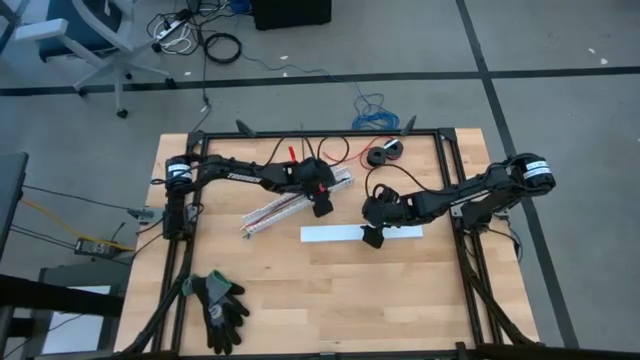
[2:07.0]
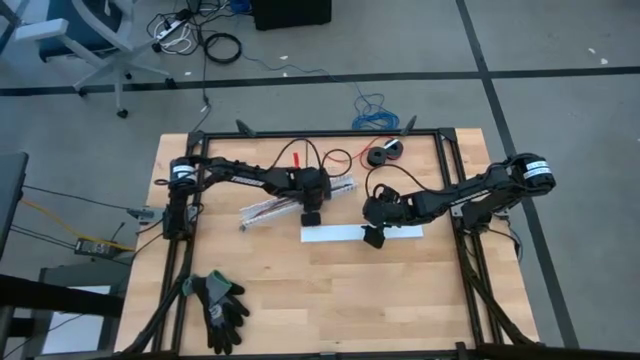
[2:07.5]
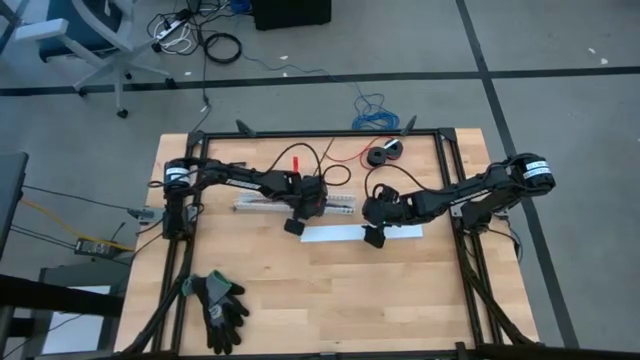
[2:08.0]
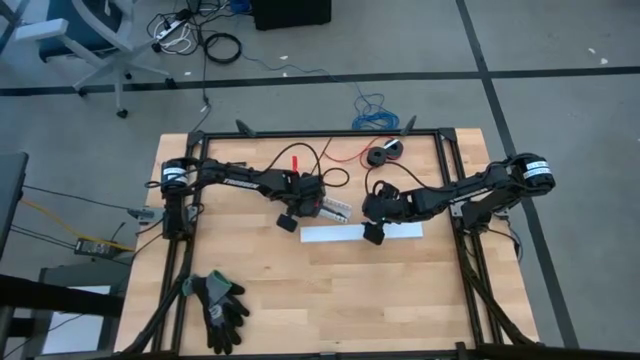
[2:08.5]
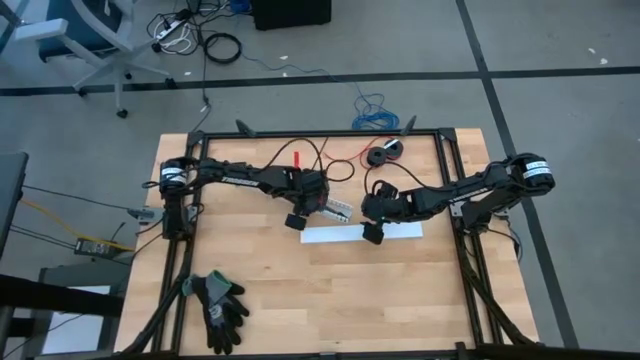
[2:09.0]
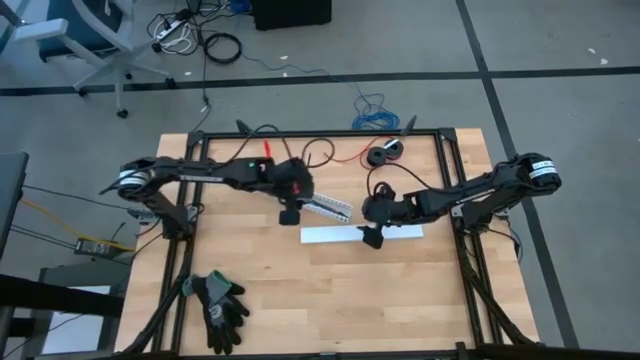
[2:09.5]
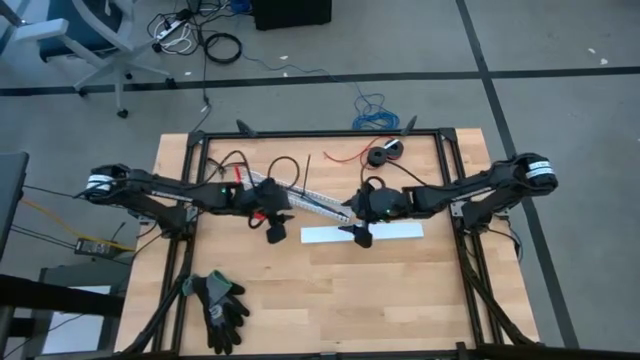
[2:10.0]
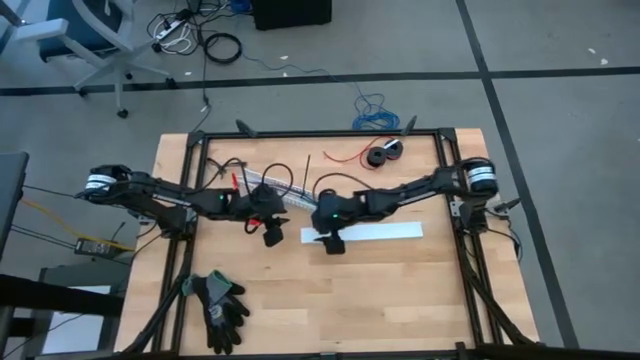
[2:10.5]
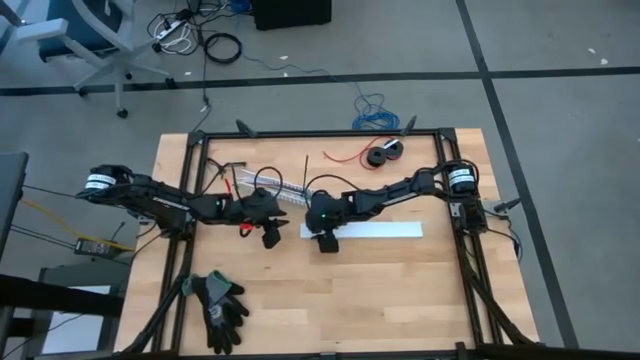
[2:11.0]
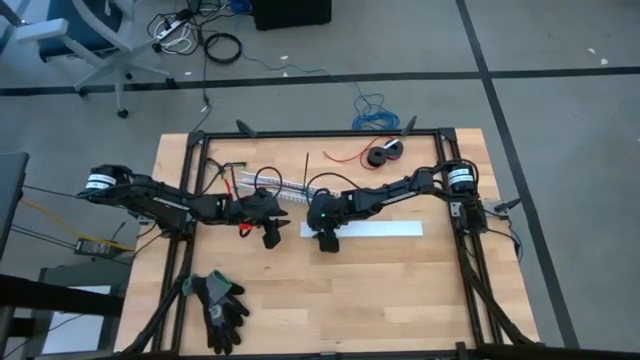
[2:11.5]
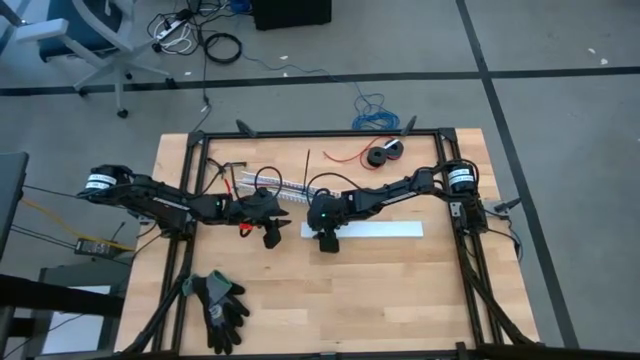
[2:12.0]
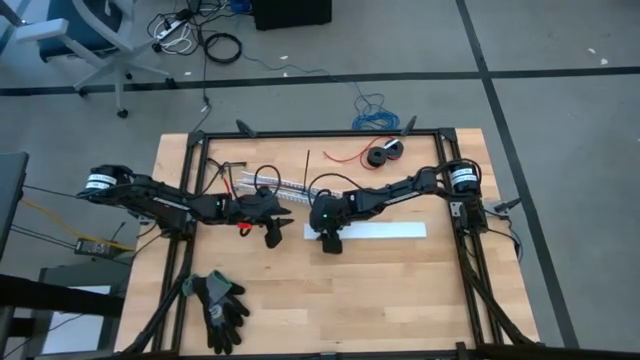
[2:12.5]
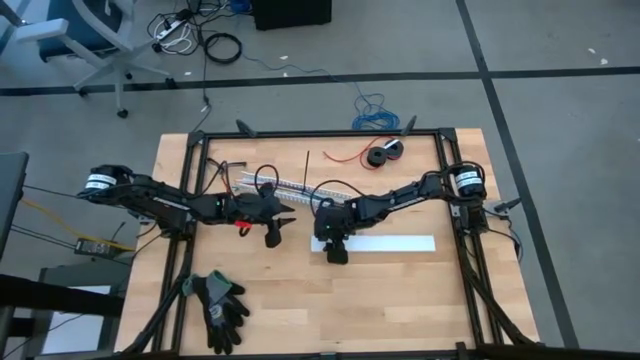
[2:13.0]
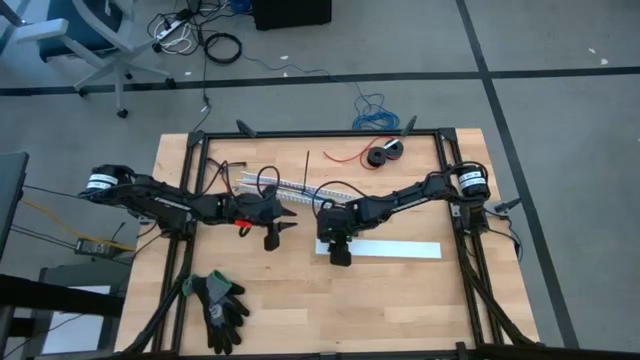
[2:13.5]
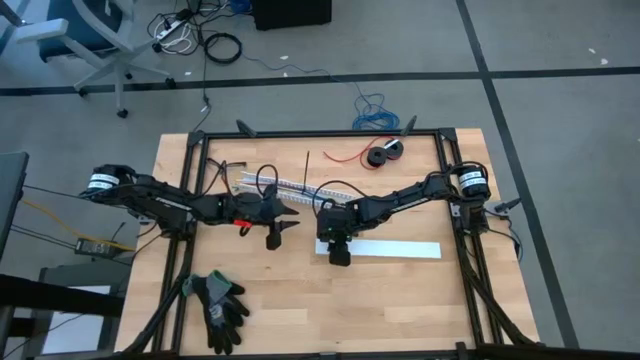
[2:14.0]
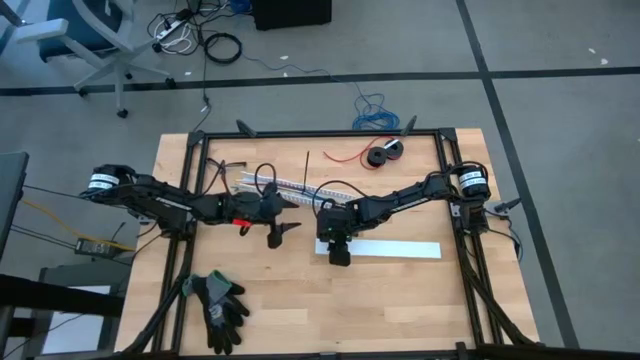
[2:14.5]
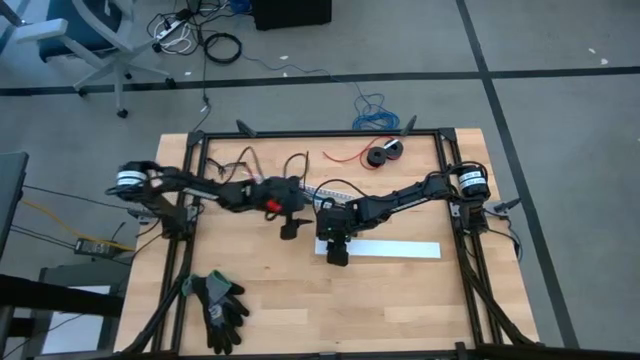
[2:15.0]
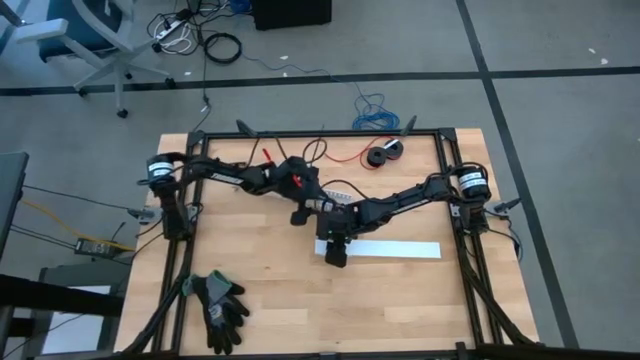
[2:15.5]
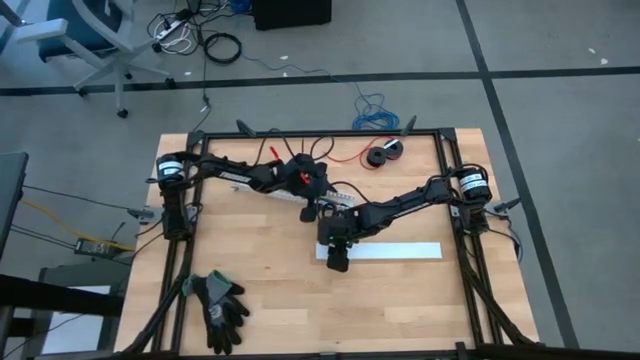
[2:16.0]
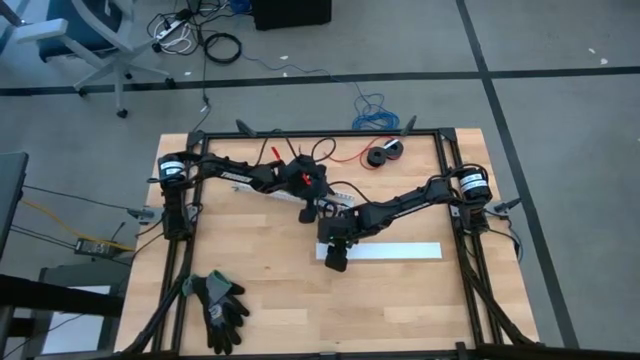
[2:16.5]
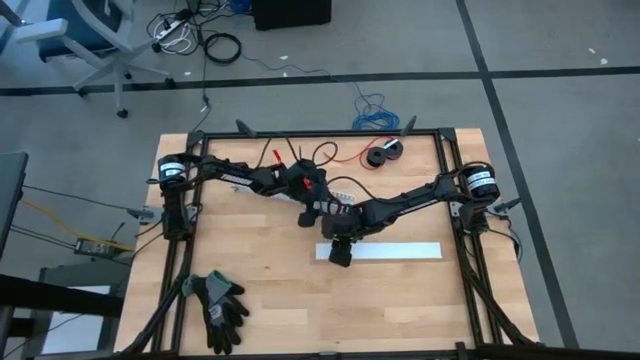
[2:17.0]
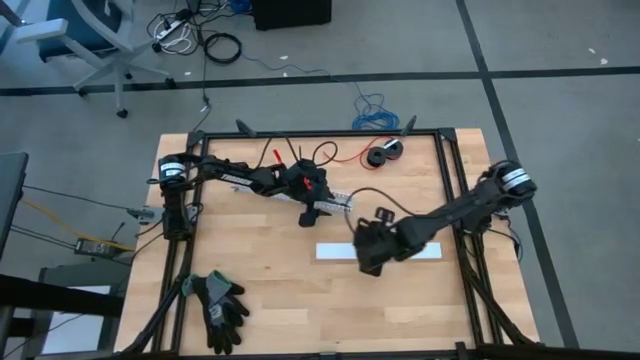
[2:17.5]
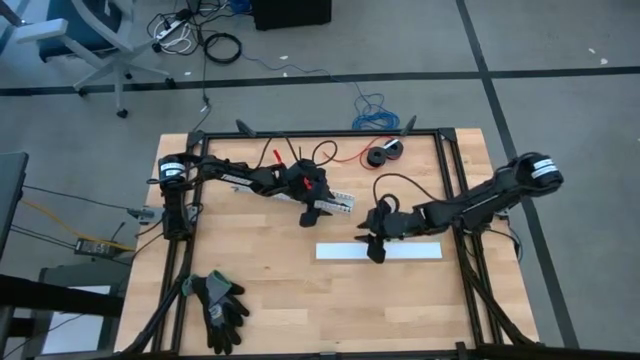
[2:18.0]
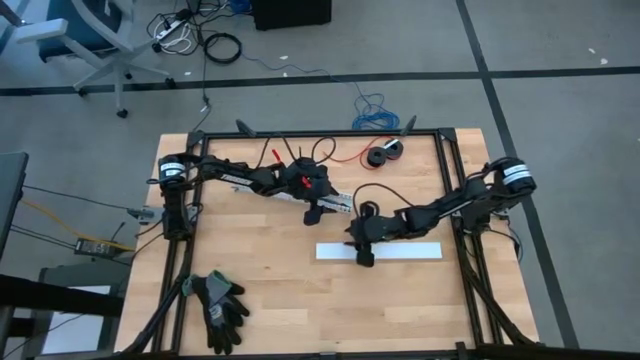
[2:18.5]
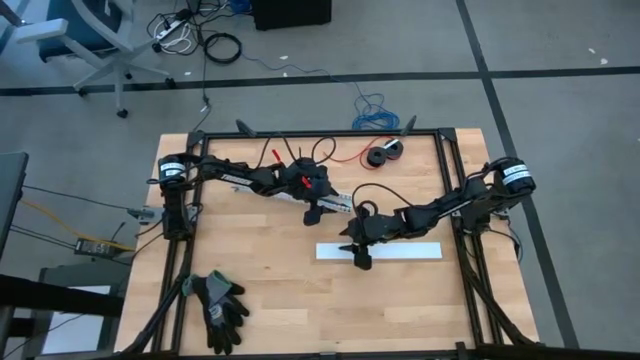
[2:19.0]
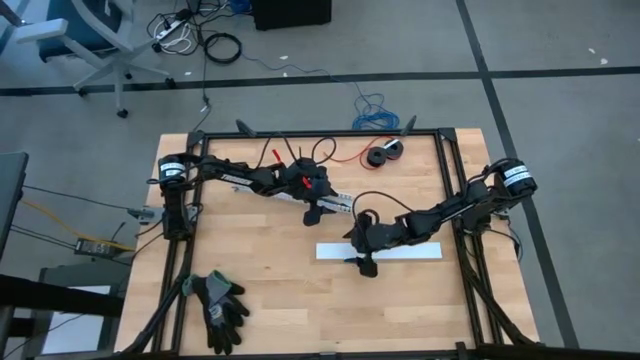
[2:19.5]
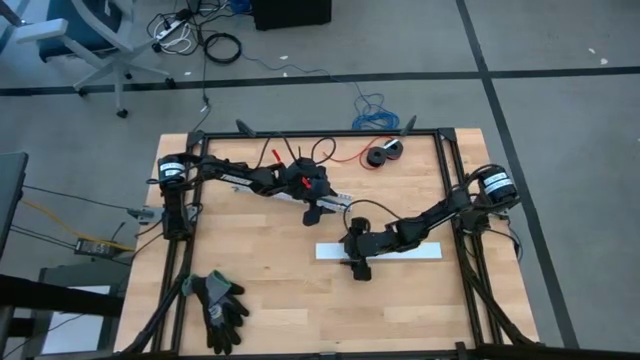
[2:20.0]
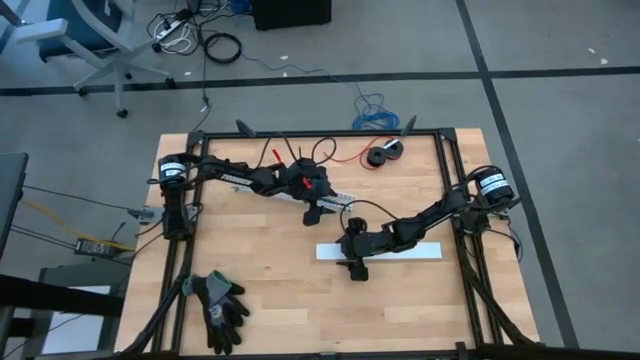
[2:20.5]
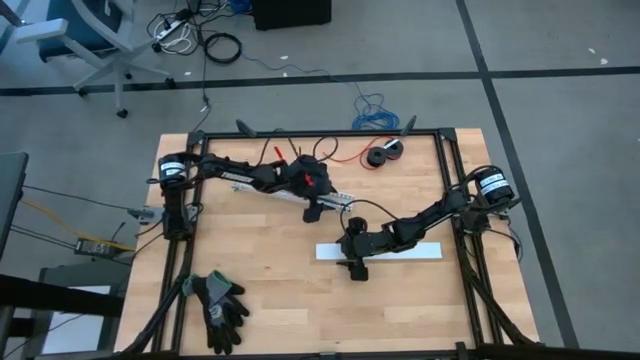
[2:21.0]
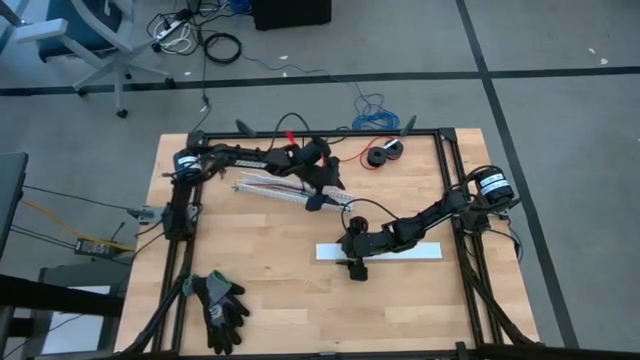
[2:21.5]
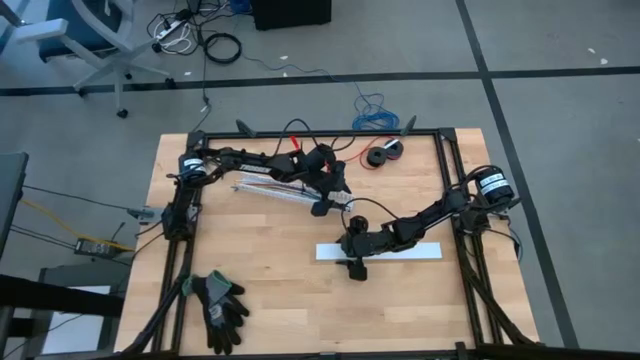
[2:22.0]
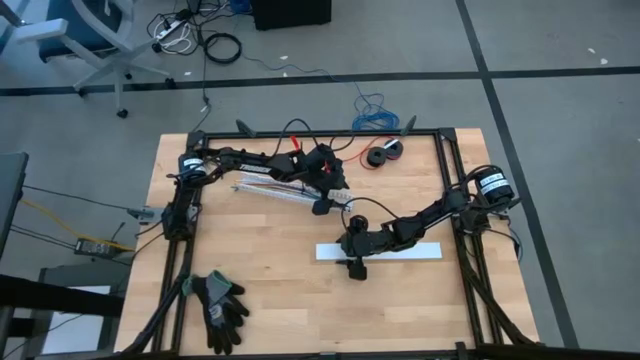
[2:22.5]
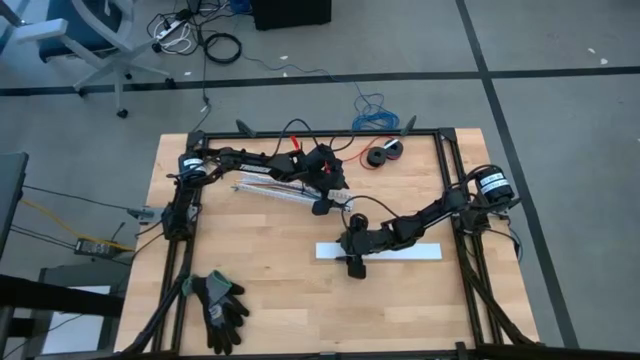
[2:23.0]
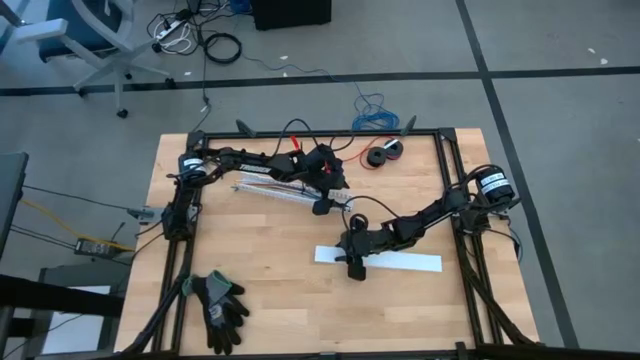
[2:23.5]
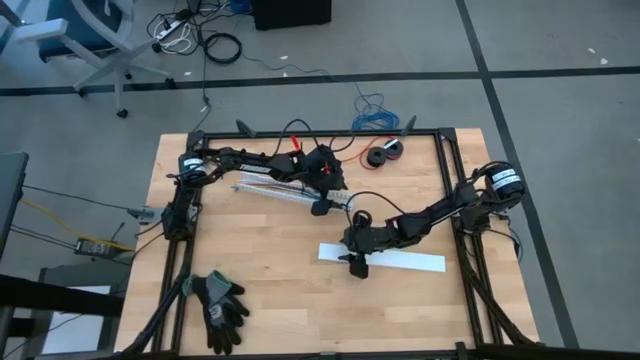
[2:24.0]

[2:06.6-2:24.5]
Task: Ziptie cables
Close the white cable duct cover
